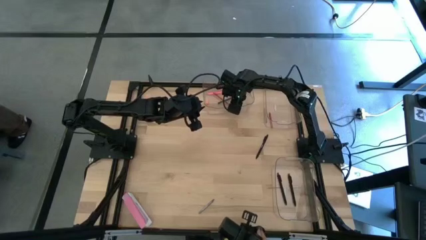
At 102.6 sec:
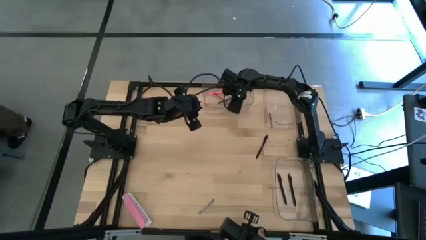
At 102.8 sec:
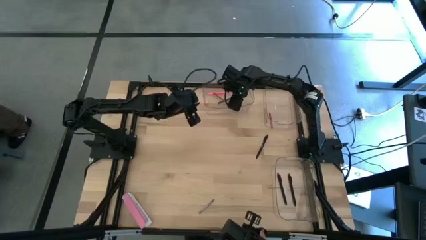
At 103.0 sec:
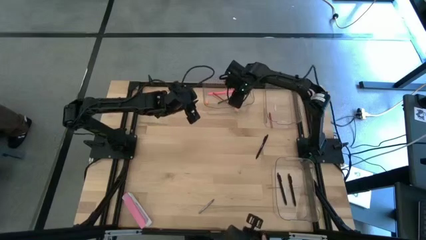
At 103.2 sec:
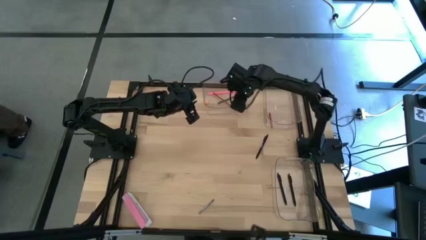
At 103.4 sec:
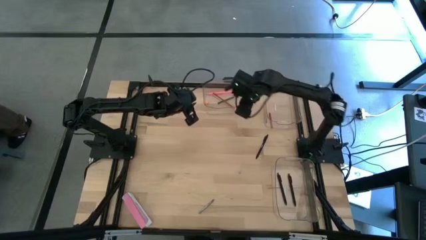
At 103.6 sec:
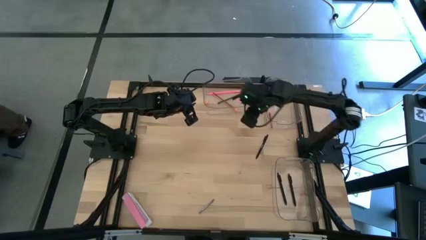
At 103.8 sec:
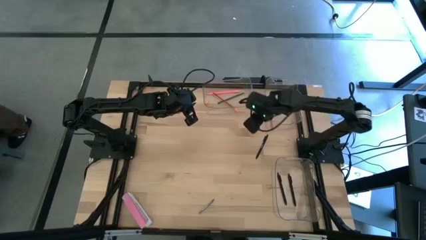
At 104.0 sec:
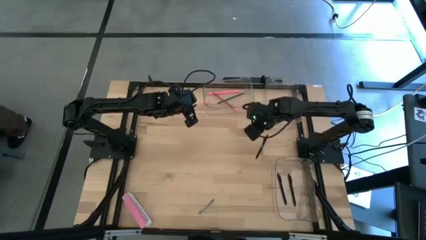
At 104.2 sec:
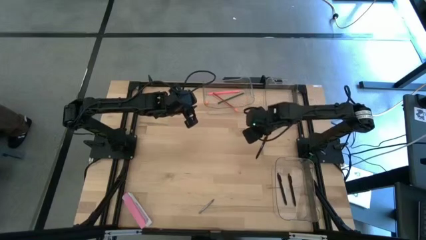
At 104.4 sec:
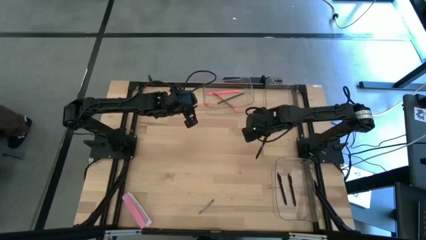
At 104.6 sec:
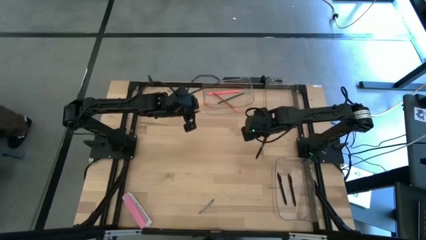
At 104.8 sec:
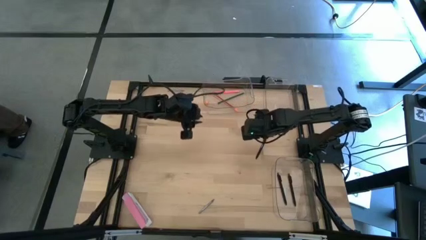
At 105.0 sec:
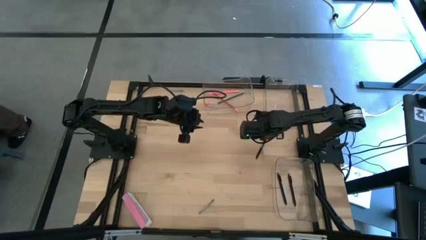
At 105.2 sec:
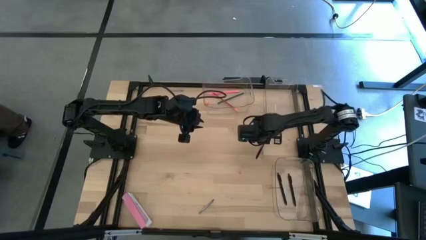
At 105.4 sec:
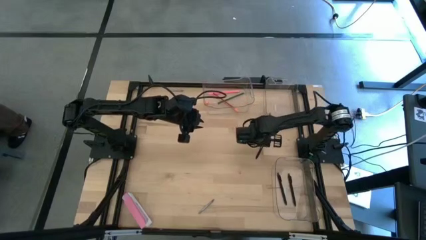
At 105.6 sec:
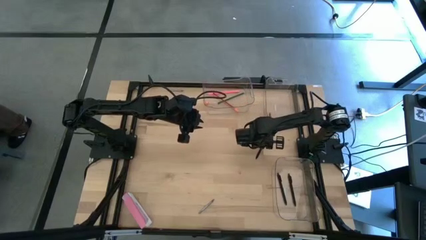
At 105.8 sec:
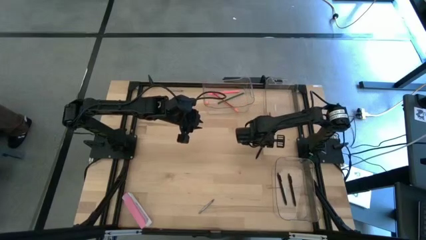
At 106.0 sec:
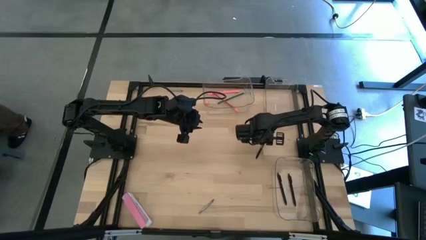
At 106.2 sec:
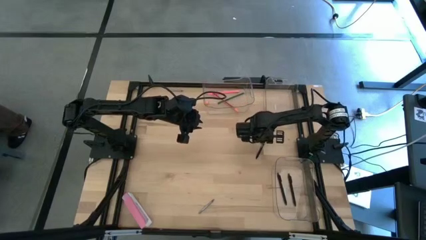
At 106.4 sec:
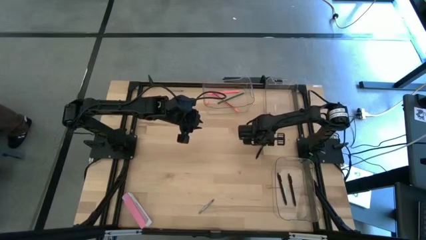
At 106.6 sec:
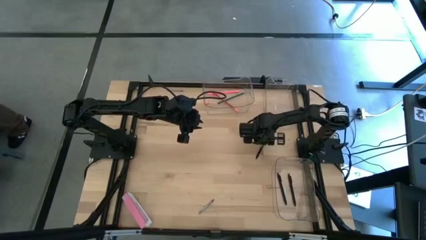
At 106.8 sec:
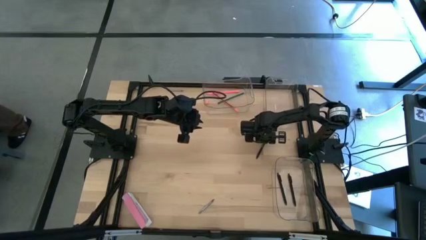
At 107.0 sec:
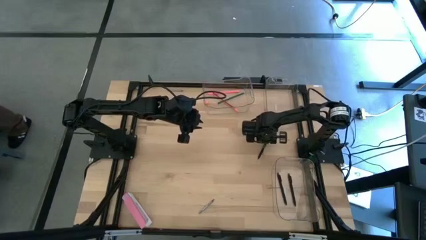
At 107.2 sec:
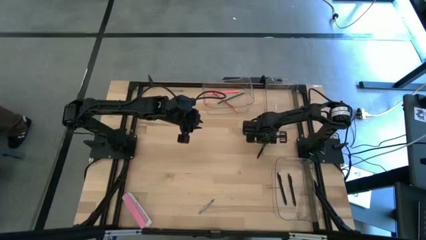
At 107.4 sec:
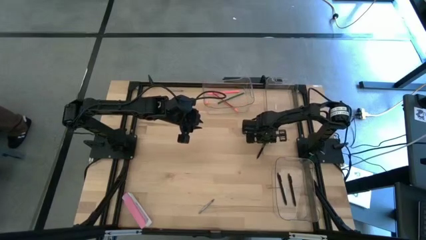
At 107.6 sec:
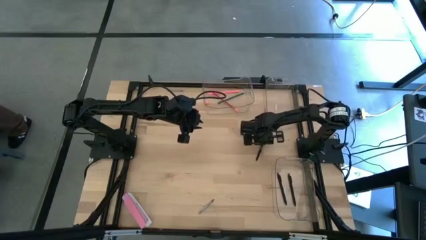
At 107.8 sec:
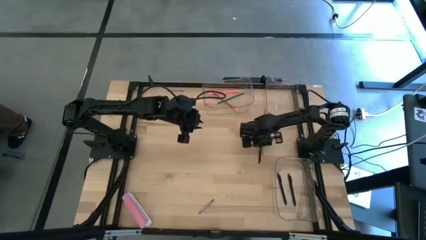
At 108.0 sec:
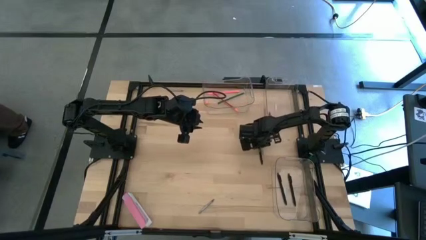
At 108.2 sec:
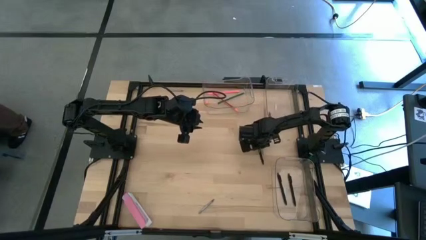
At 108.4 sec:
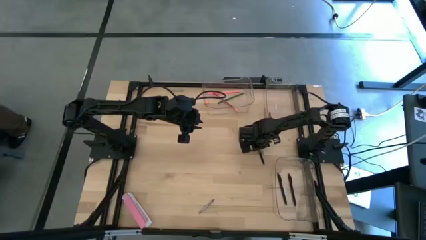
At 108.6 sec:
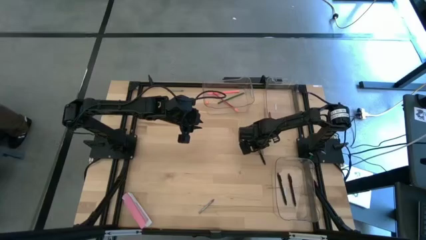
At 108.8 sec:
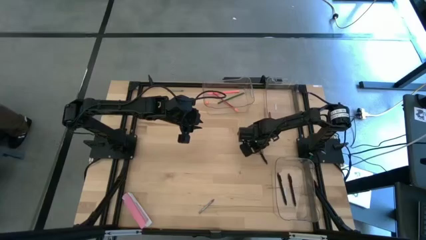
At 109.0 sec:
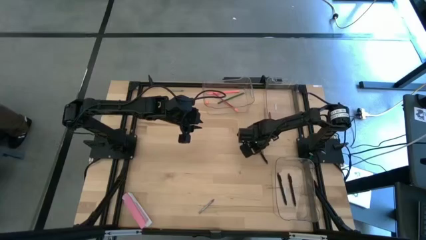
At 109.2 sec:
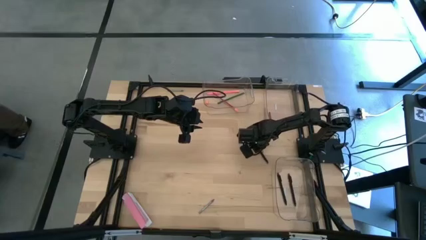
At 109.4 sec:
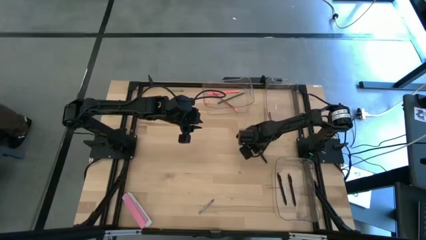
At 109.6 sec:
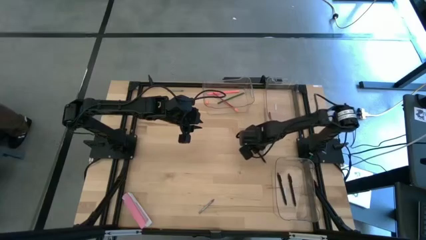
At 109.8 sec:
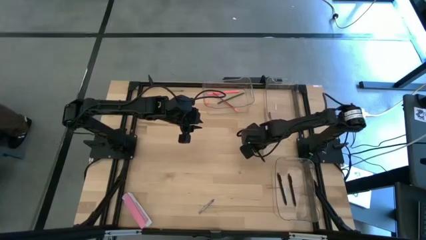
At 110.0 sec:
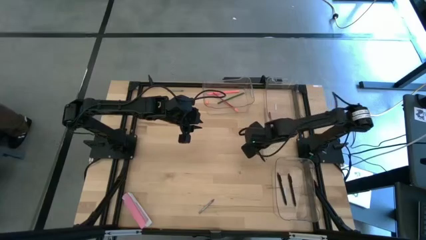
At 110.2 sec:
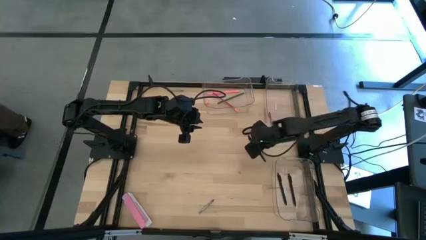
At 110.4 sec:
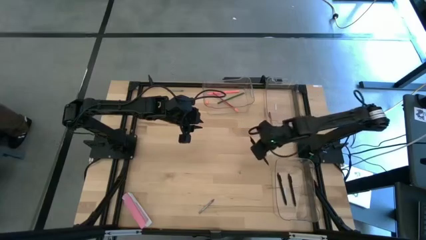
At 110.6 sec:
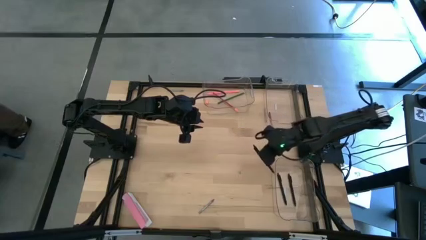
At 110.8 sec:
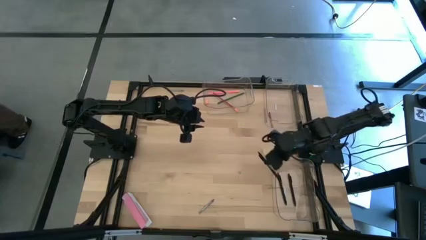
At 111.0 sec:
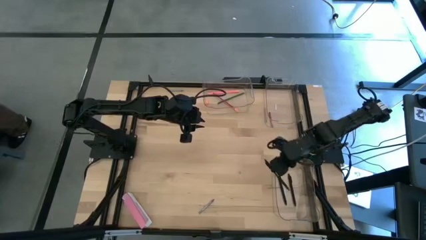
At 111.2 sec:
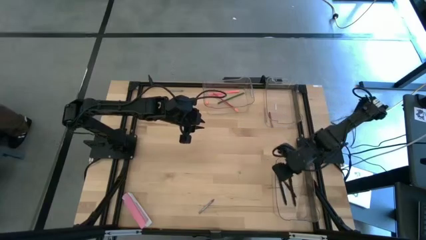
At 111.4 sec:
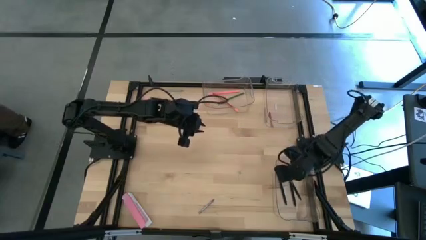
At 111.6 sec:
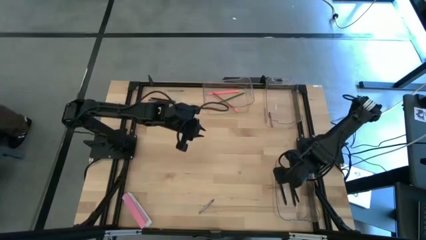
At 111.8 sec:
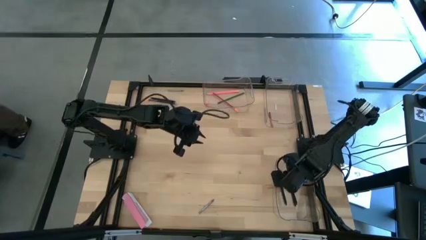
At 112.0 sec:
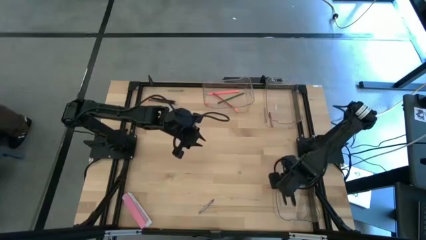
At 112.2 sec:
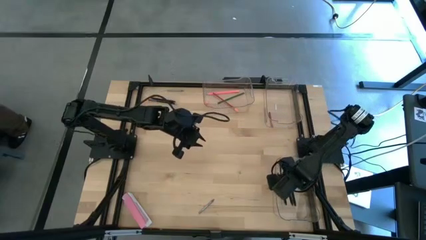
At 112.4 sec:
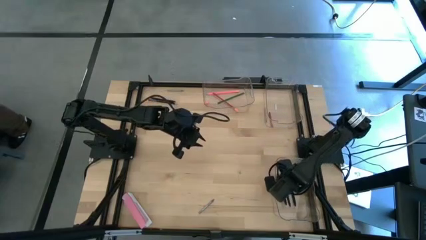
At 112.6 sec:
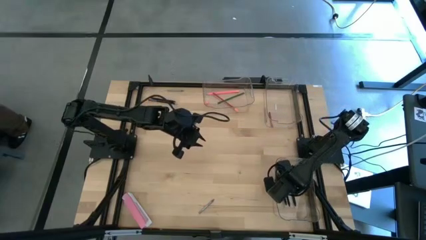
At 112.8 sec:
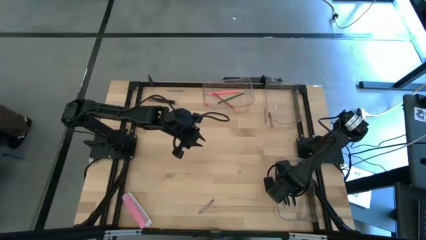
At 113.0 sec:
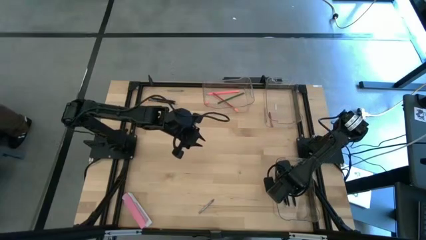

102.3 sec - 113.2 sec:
Task: Sort crayons/erasers/pens/pencils in bins
Put the right black pen into the bottom right transparent bin
